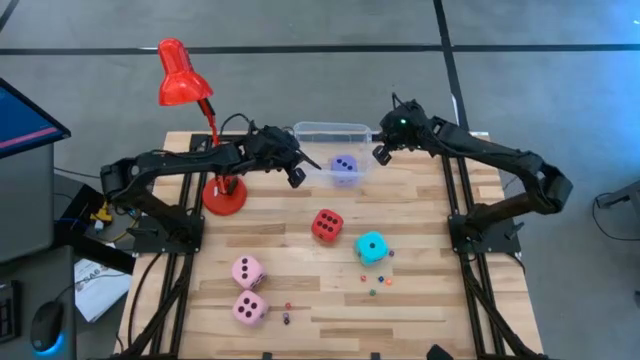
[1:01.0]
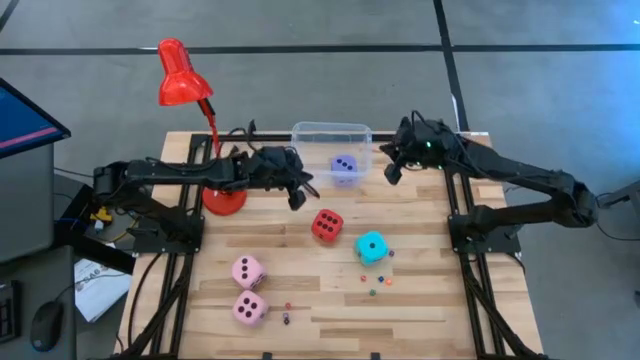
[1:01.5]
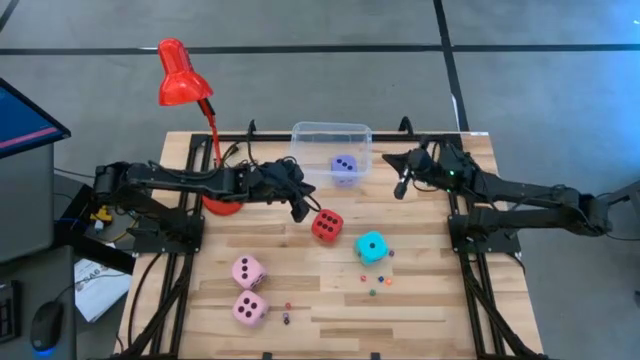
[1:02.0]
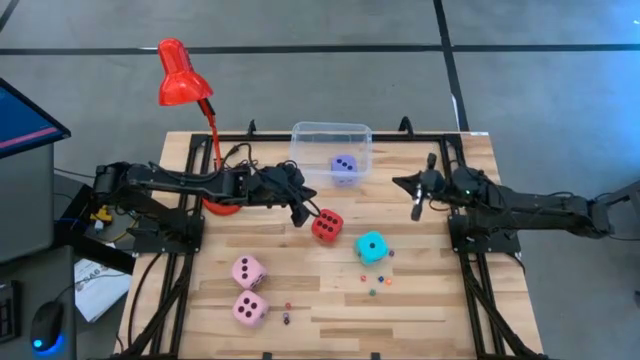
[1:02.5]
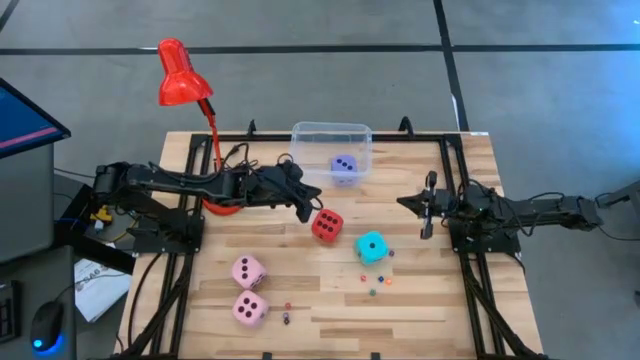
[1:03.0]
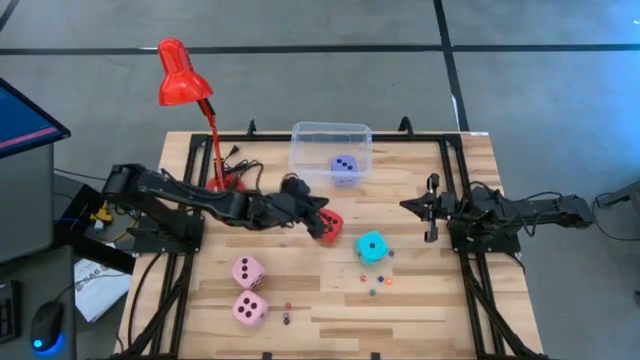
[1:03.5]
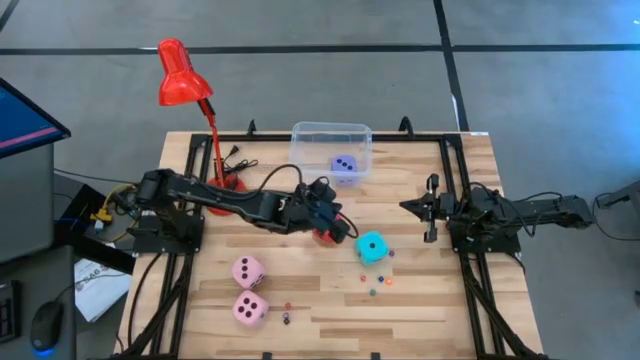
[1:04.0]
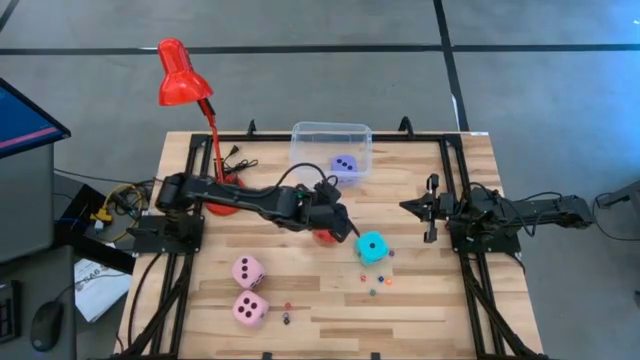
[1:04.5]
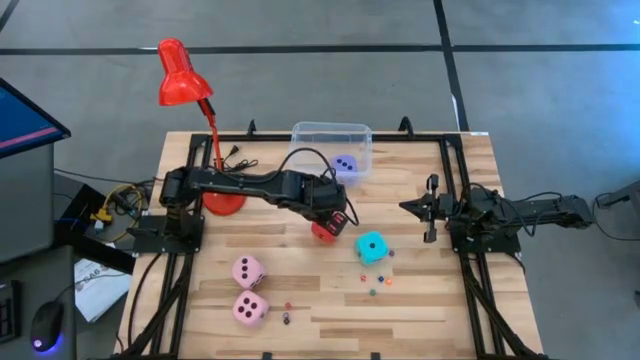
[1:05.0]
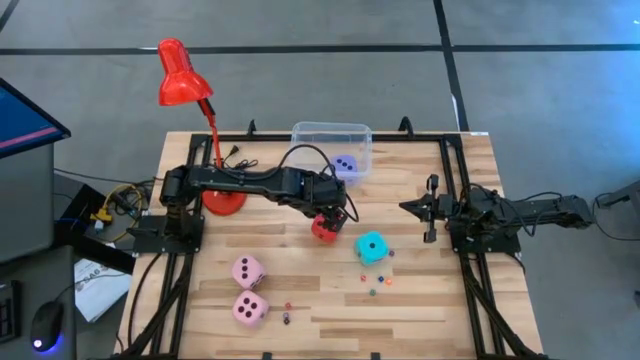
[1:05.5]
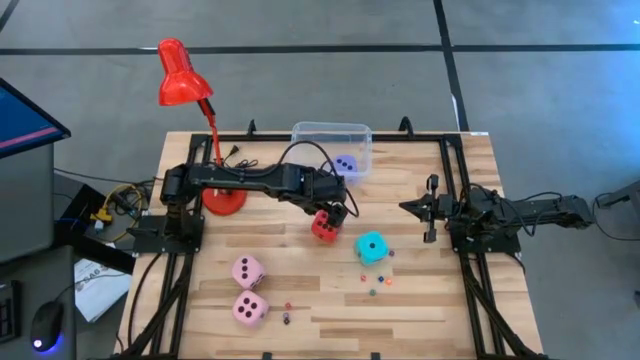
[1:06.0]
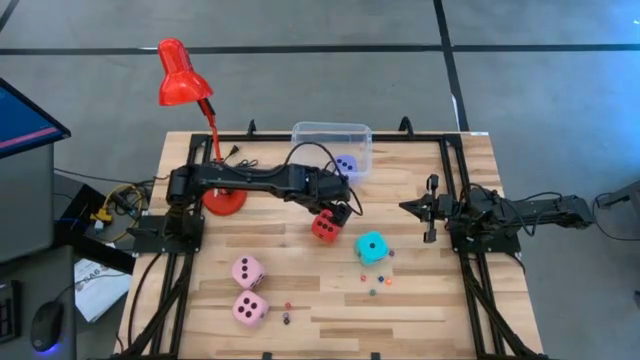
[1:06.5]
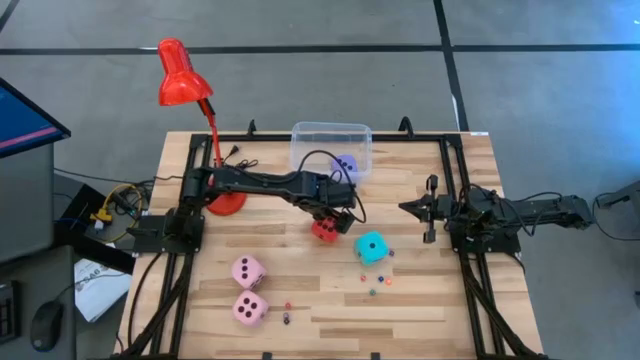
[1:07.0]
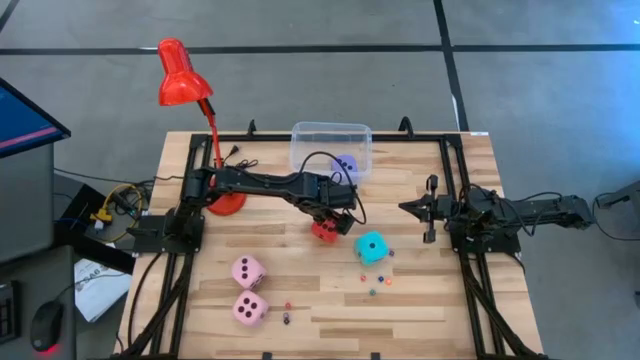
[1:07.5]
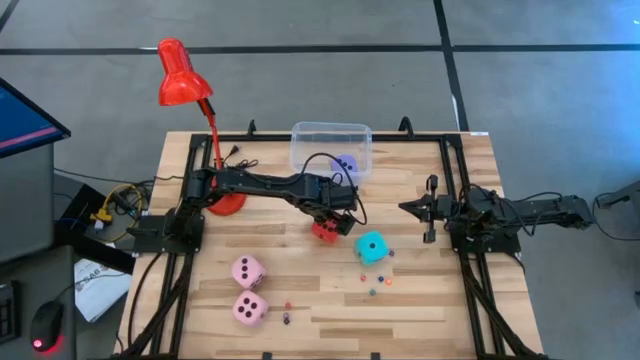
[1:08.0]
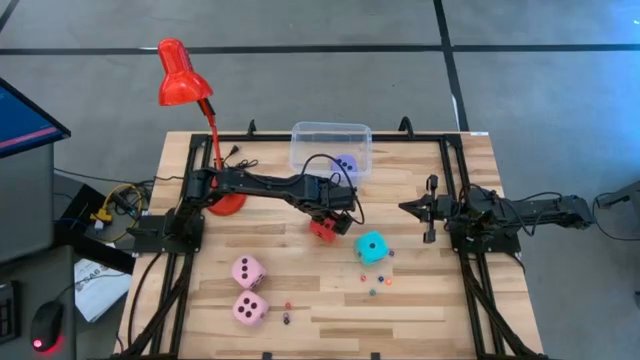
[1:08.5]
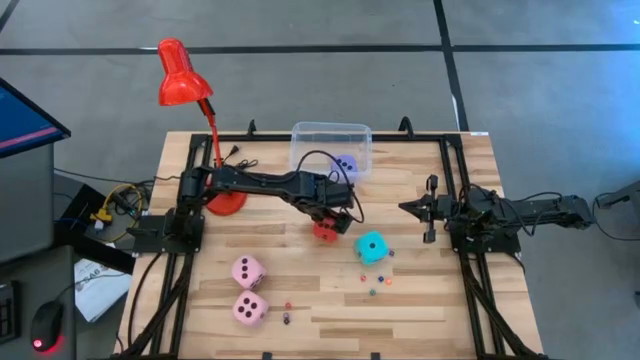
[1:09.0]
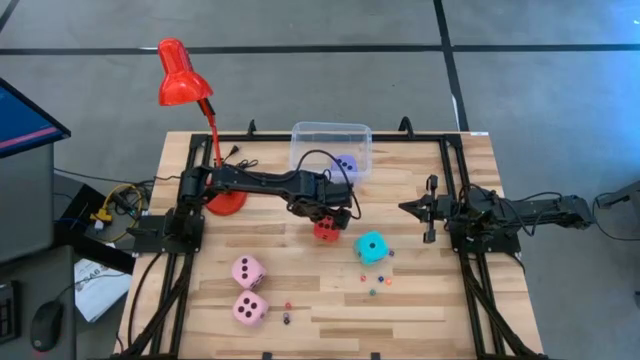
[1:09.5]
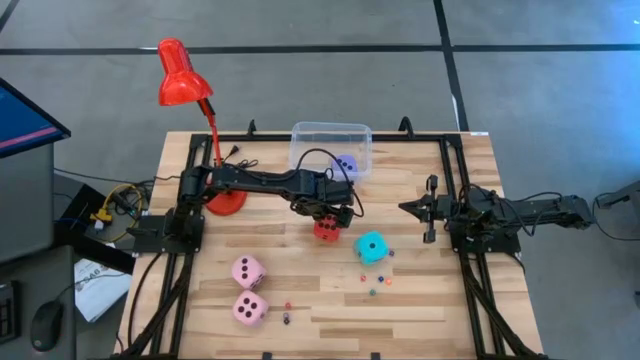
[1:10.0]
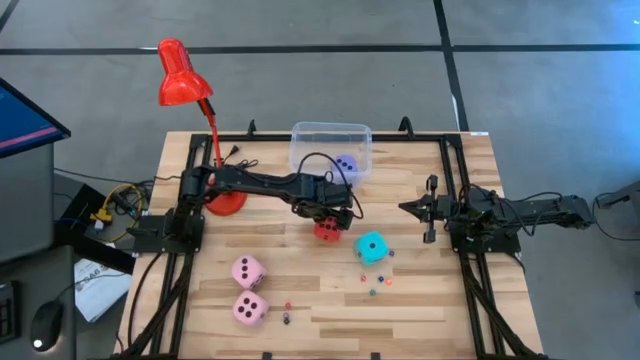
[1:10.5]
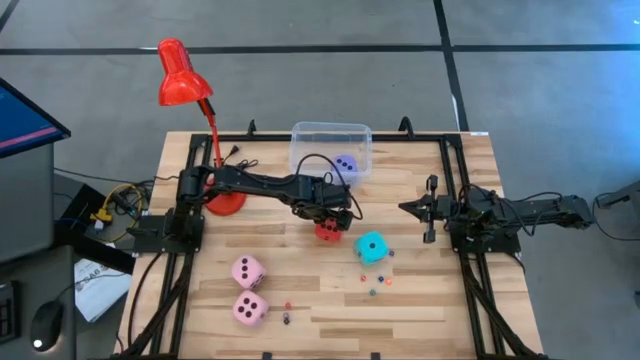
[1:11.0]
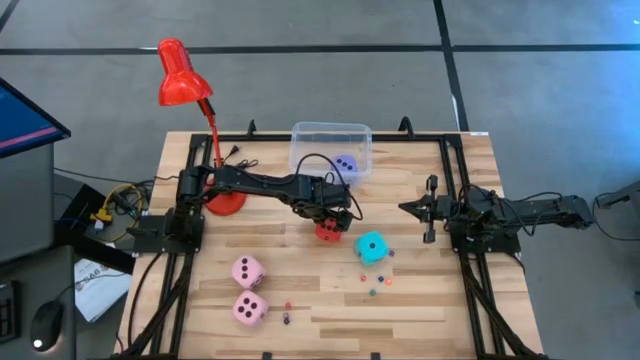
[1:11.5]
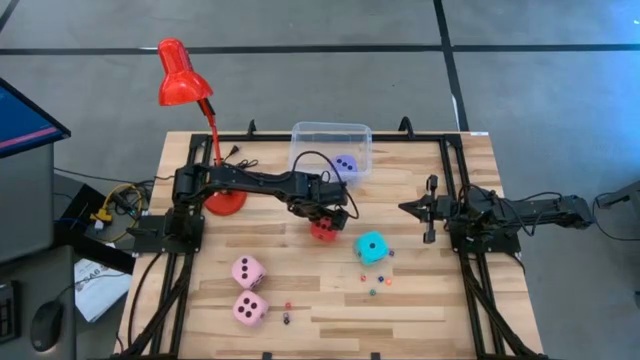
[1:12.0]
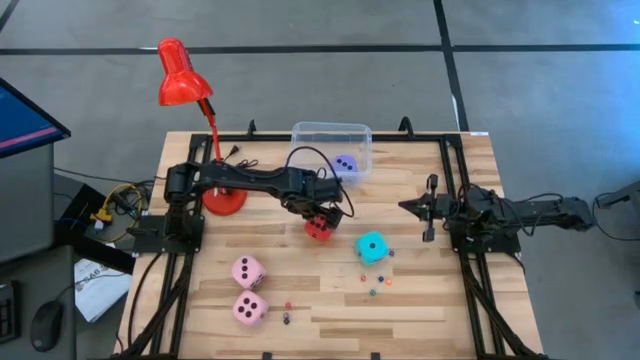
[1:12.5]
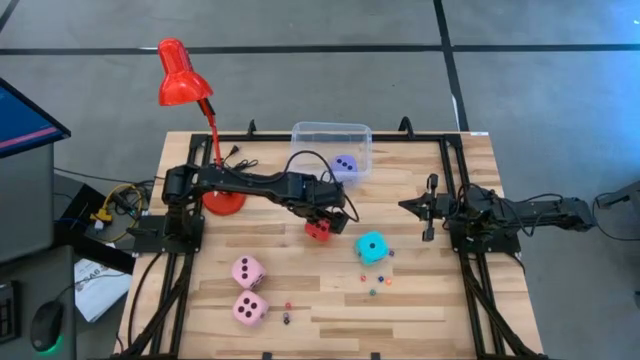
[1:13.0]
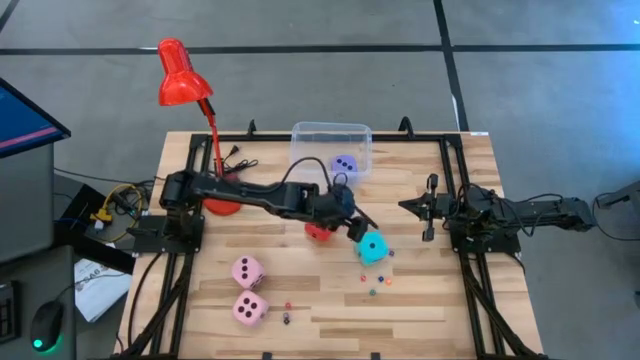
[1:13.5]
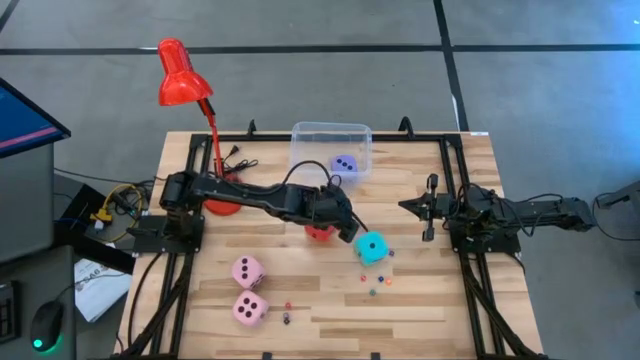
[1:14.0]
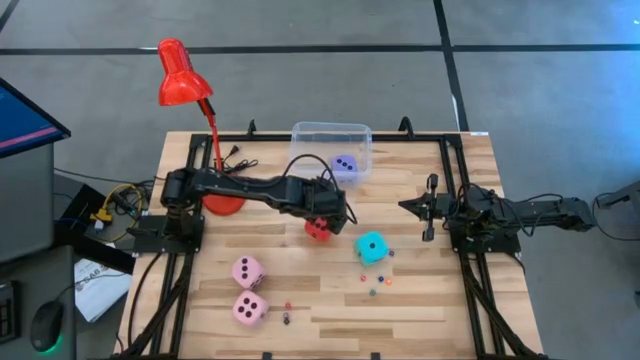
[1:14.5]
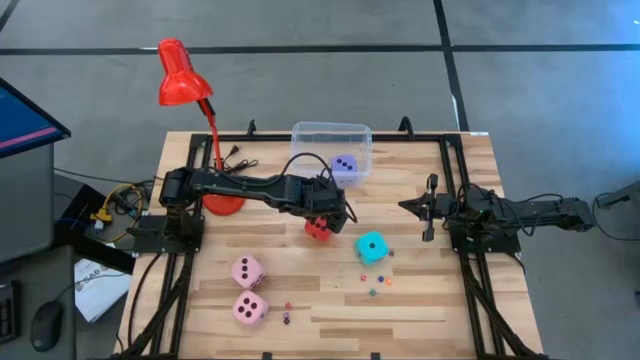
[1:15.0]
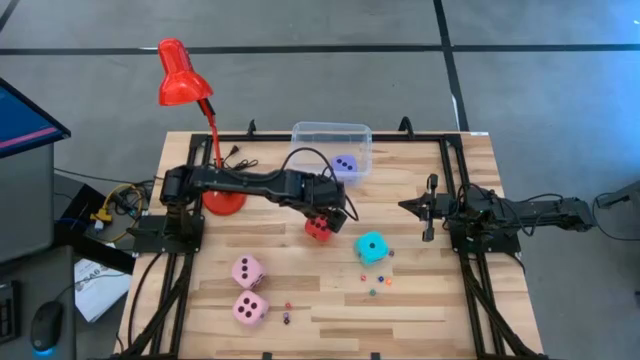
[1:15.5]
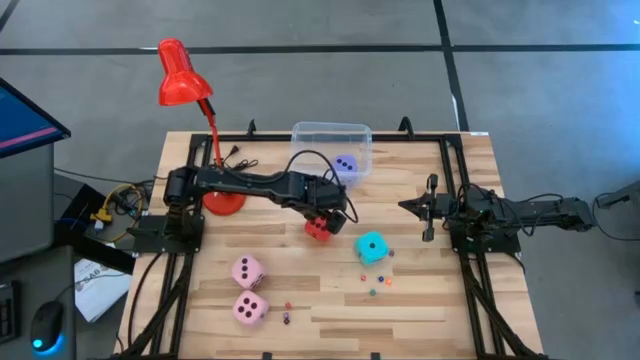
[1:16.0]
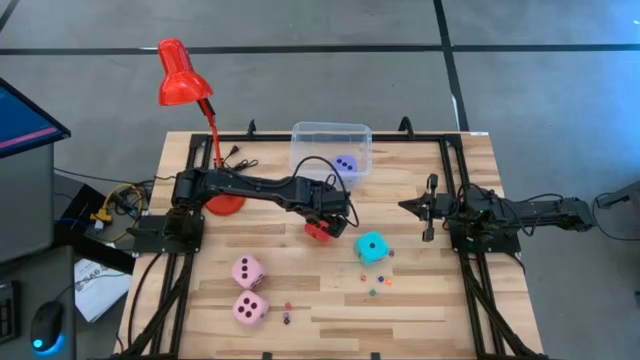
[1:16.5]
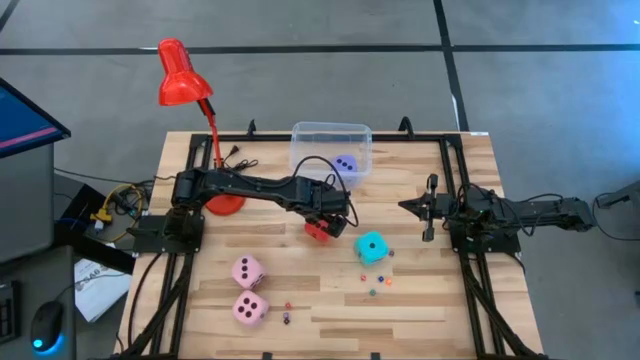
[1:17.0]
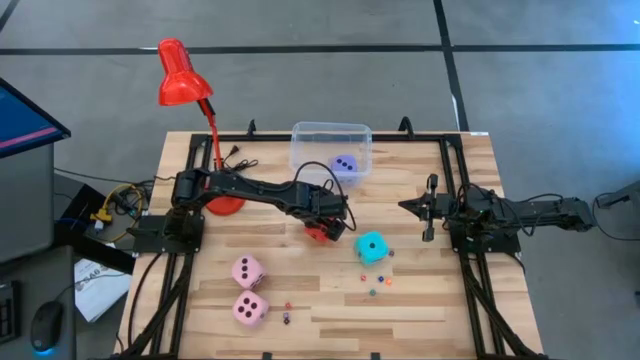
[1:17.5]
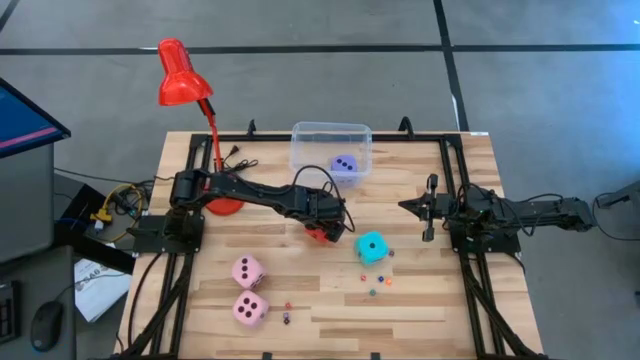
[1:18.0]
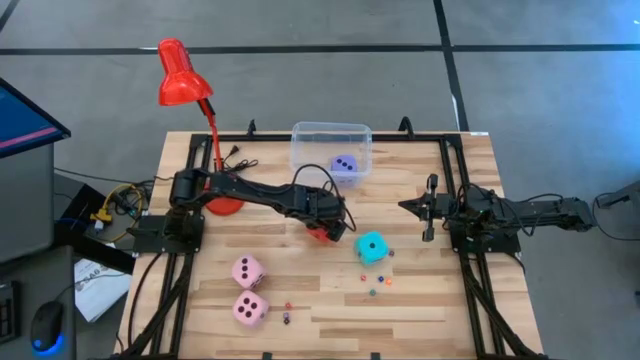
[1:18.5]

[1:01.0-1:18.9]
Task: Pick & Place Dice
Put the large red die into the transparent bin

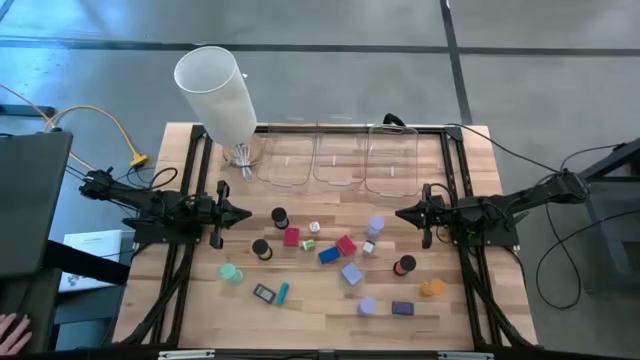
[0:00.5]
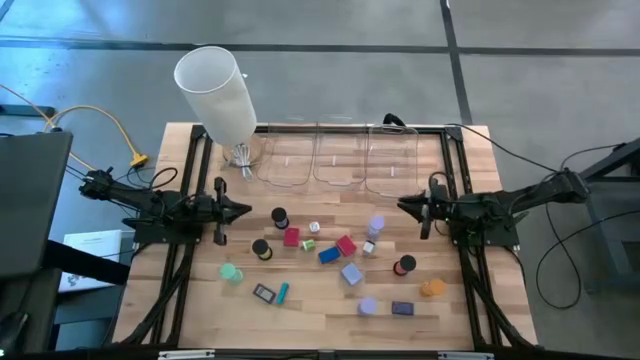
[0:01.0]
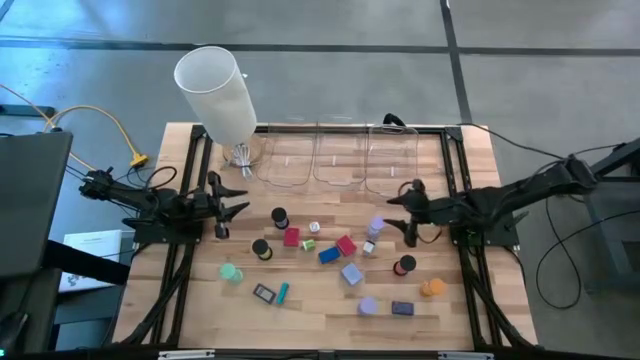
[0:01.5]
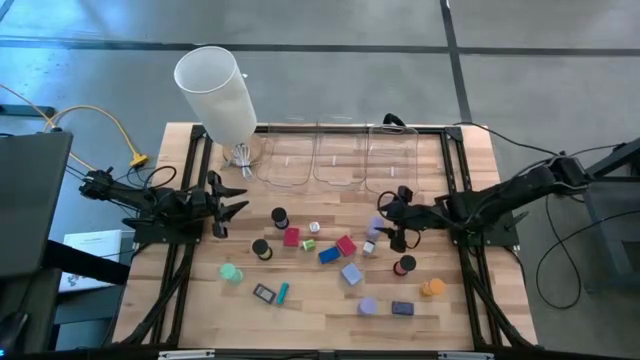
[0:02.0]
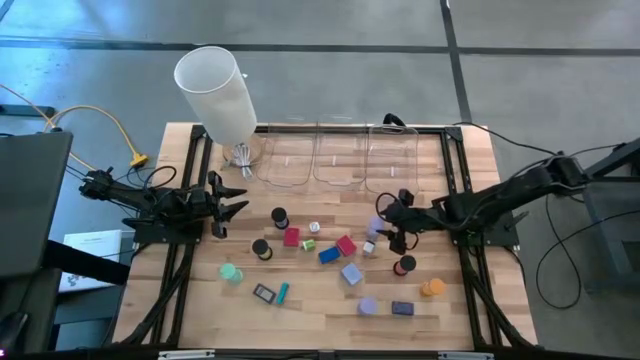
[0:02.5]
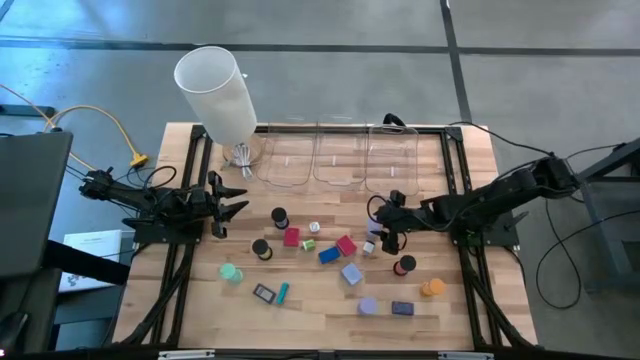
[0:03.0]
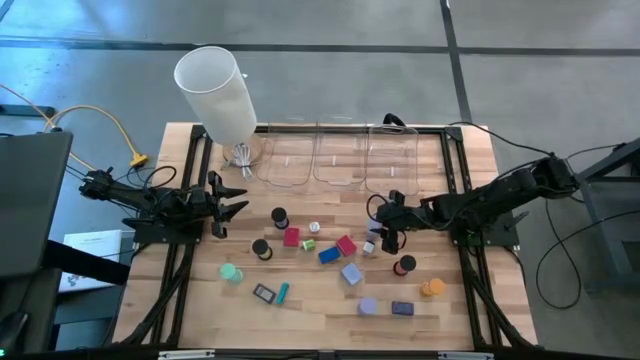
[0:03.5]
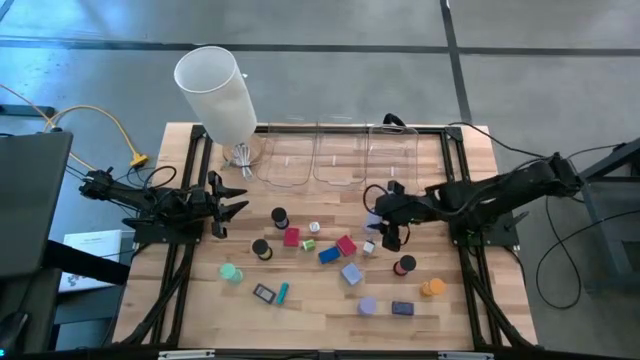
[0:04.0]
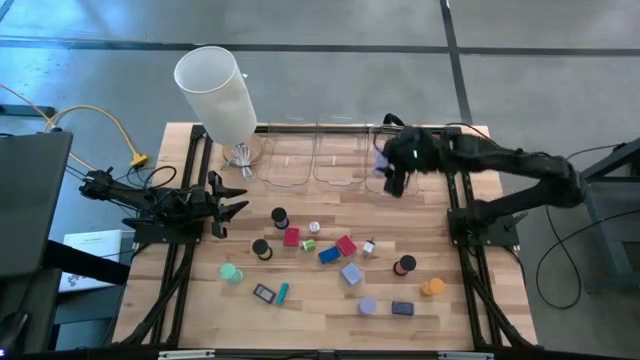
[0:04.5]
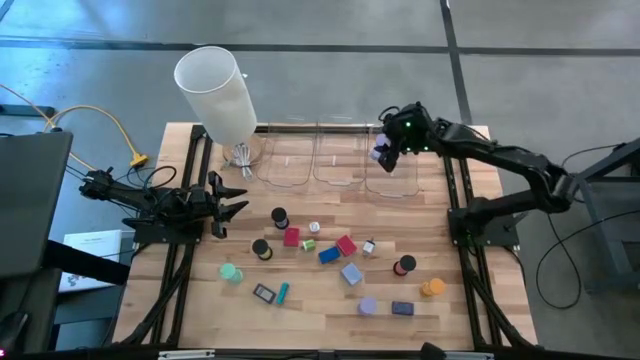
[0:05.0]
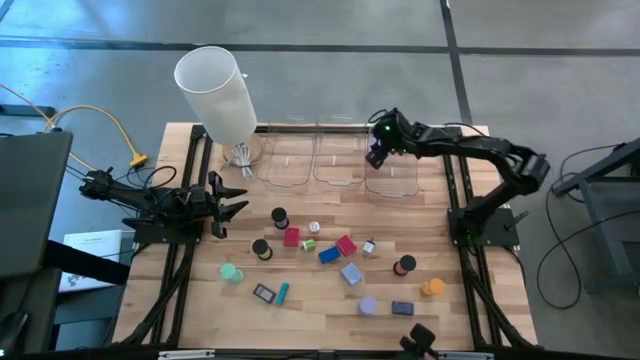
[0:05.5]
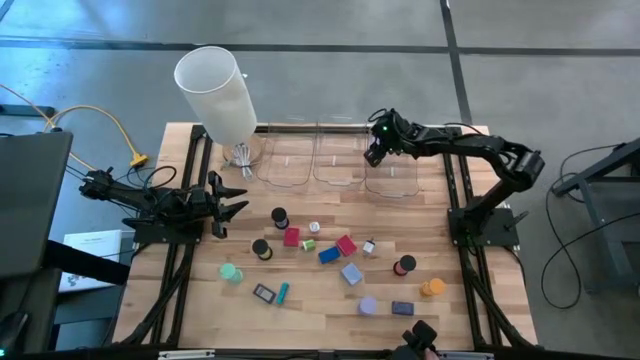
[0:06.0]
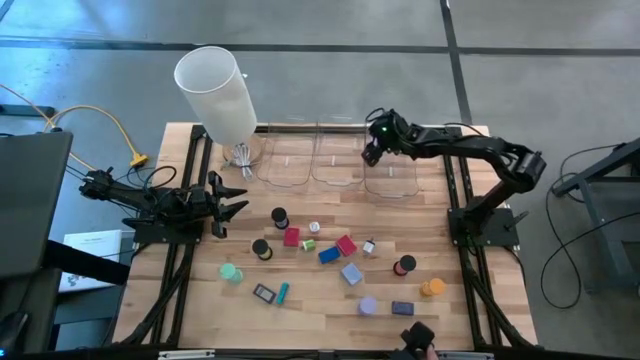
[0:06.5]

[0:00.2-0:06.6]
Task: Pick & Place Office items
Put the top purple hourglass into the right transparent bin
